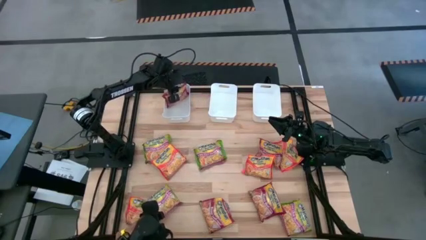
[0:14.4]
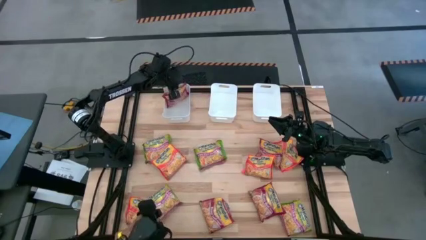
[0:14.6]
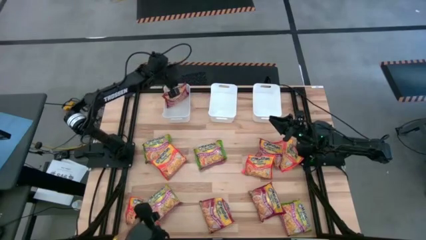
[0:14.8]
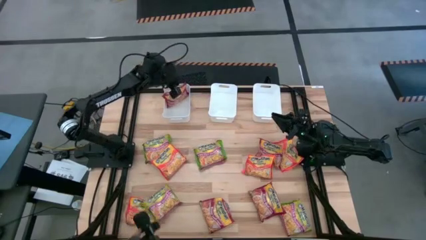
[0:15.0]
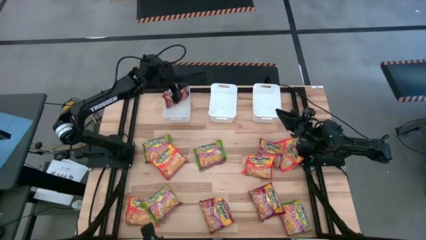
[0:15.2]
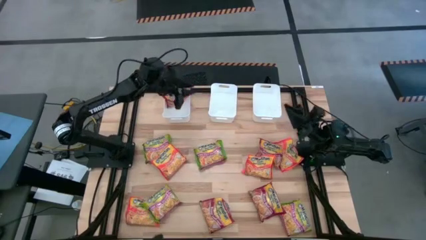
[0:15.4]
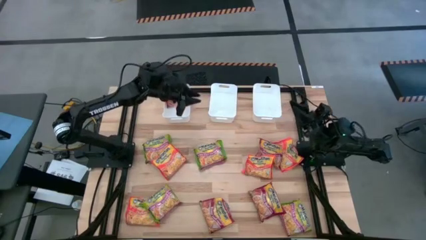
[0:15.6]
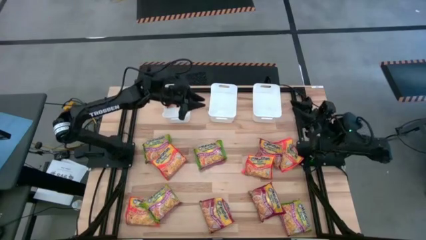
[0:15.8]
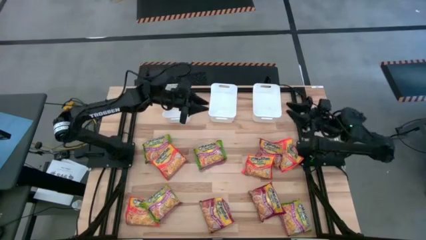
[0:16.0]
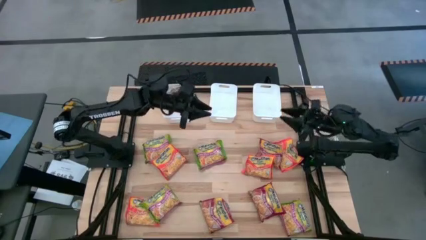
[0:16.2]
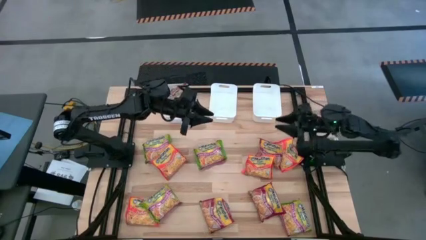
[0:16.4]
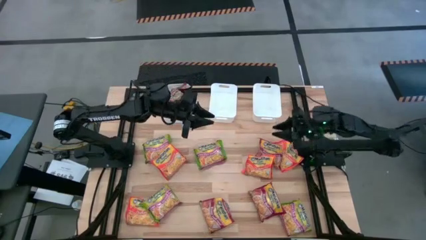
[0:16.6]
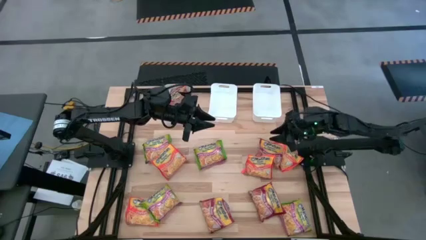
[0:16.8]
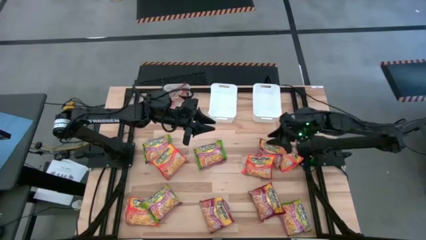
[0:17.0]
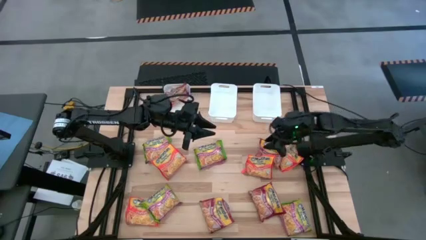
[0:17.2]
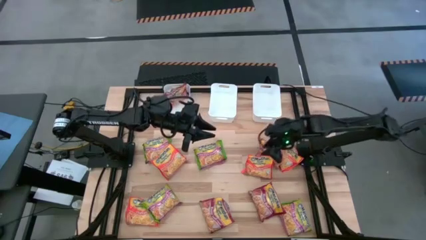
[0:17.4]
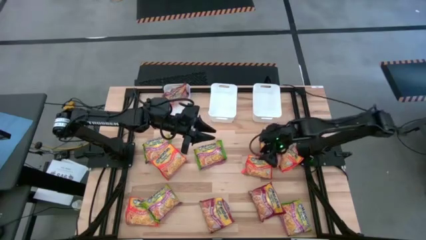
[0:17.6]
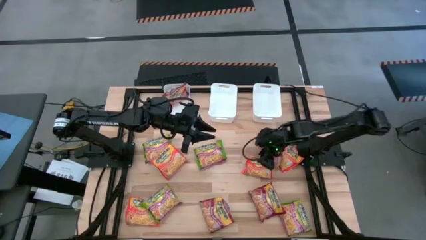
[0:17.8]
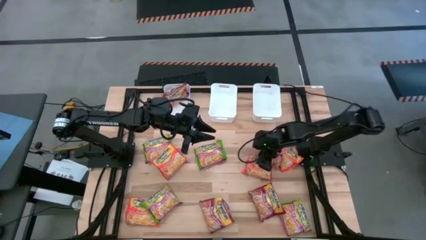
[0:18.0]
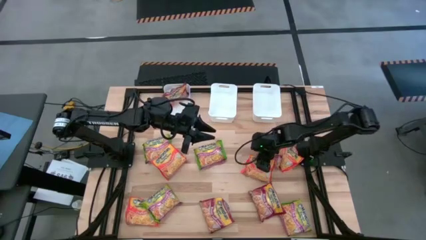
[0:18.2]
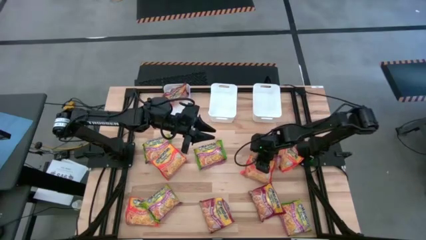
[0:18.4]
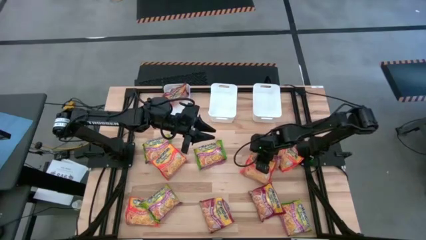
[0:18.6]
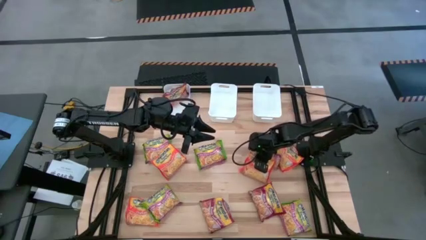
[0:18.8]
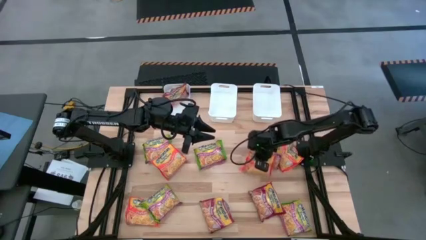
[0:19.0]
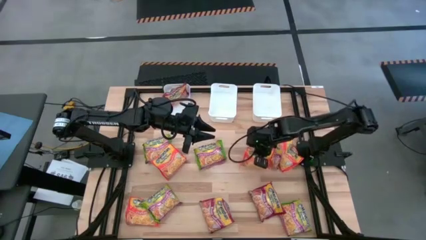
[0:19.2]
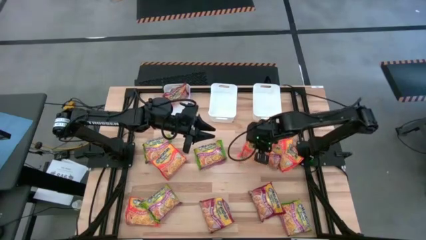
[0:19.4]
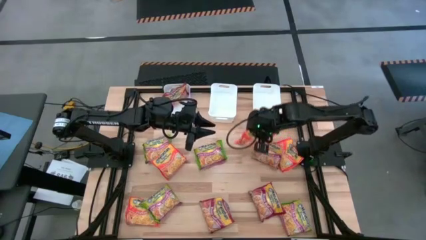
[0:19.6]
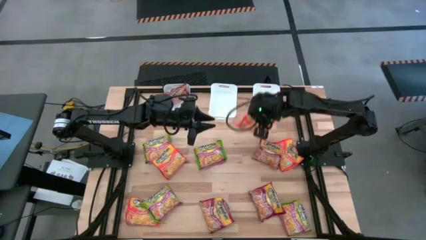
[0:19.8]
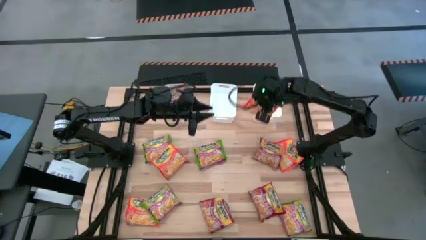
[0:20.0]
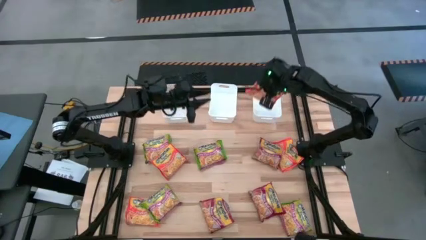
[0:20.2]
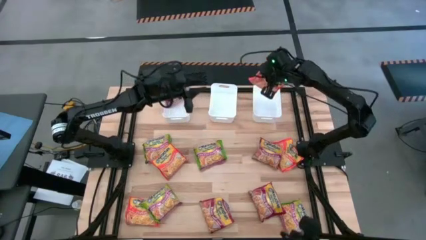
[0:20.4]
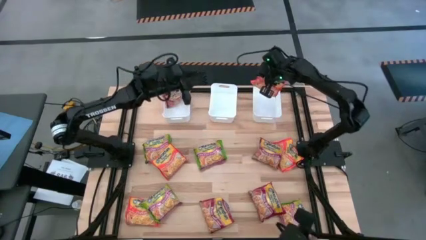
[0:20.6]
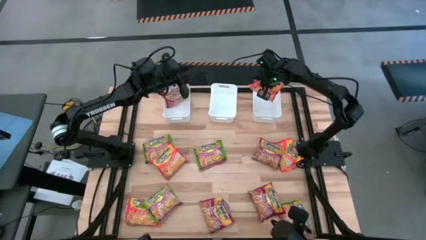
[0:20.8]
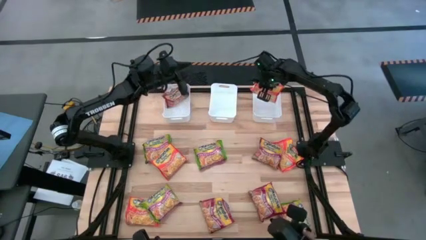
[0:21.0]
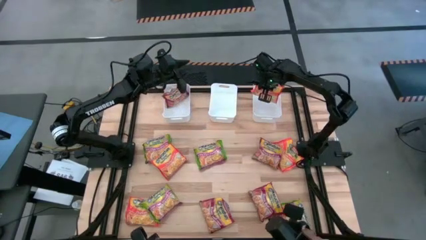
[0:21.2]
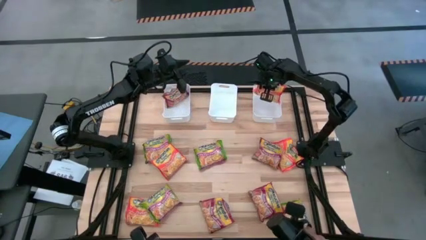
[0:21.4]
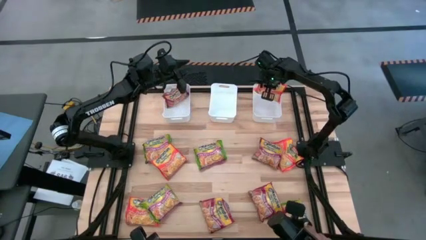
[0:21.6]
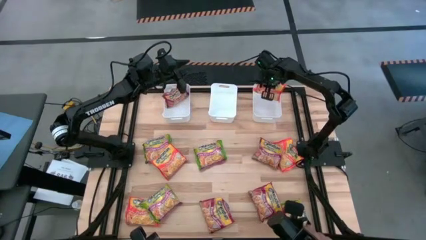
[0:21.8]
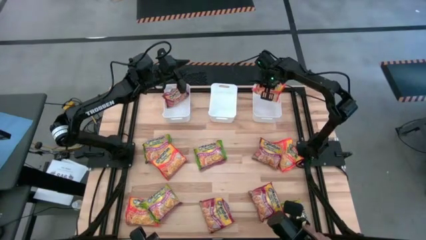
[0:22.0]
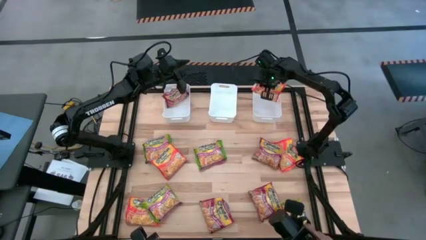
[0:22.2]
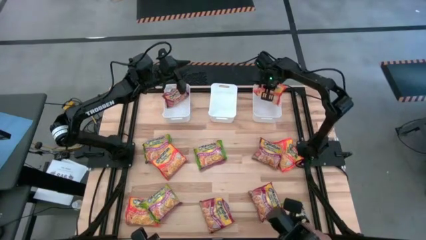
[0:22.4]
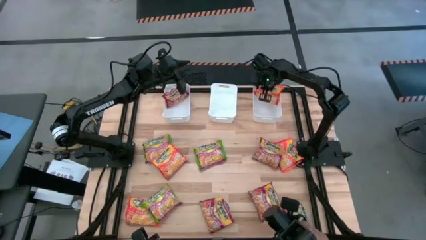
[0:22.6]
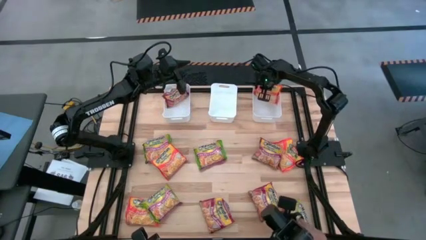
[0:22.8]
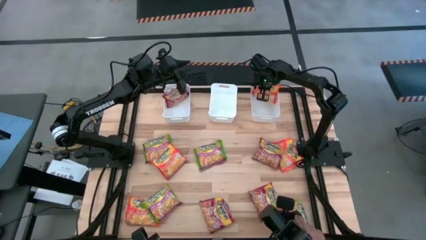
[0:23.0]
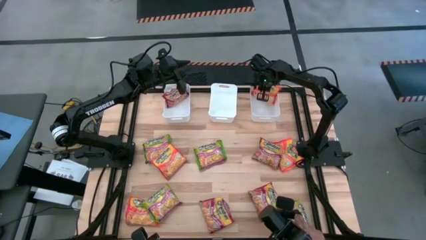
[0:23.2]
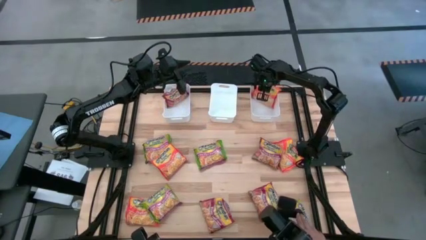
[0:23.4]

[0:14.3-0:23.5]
Task: Sort Maruchan noodles
Put the orange noodle pack into the right white bin

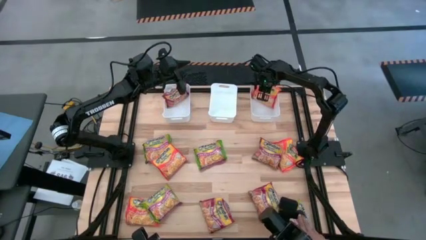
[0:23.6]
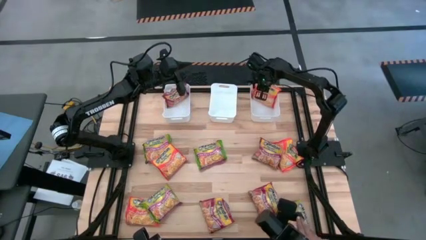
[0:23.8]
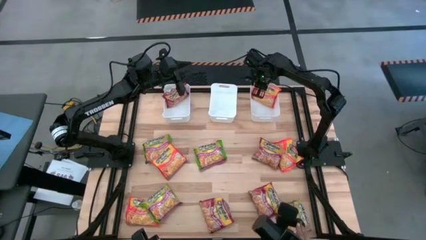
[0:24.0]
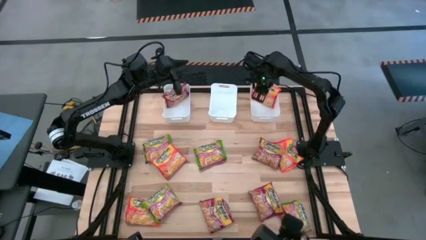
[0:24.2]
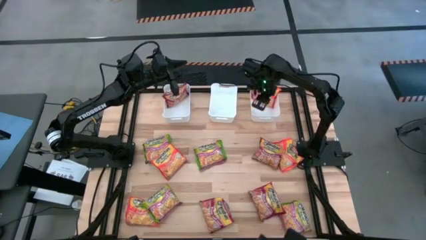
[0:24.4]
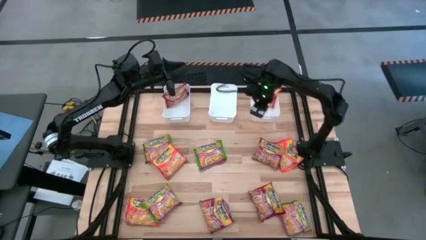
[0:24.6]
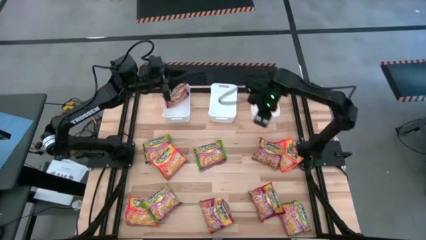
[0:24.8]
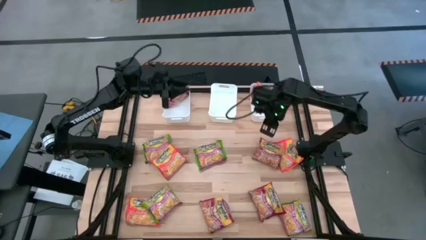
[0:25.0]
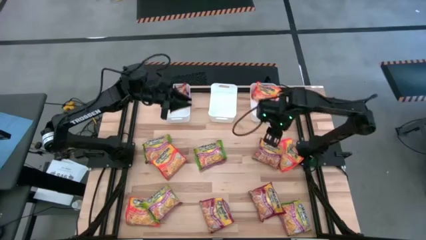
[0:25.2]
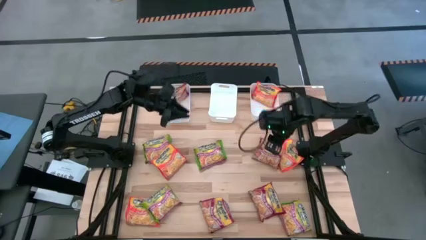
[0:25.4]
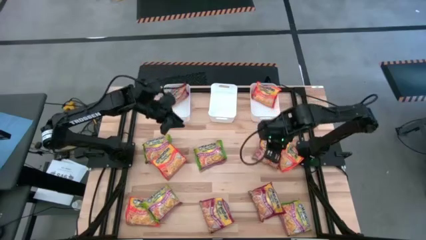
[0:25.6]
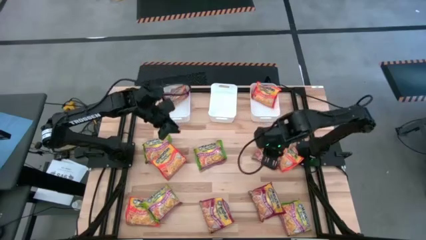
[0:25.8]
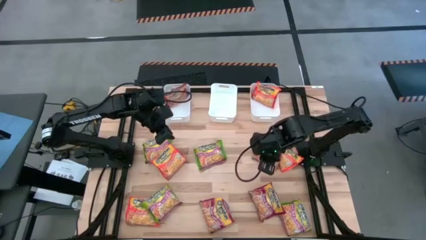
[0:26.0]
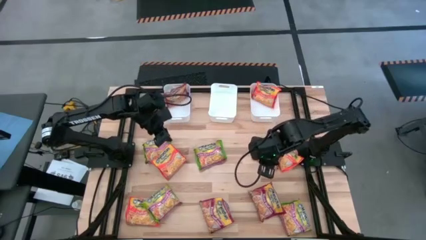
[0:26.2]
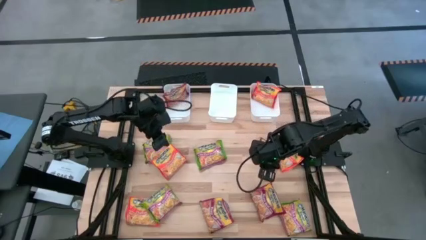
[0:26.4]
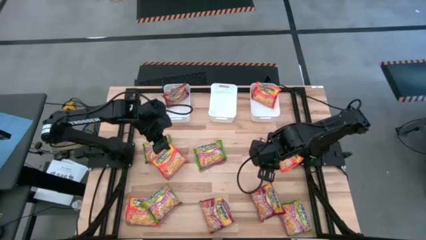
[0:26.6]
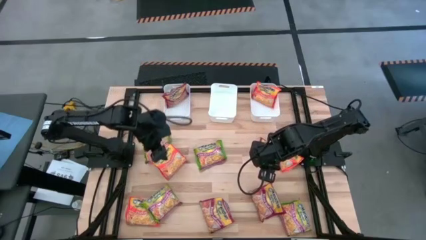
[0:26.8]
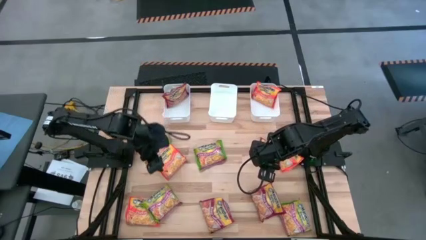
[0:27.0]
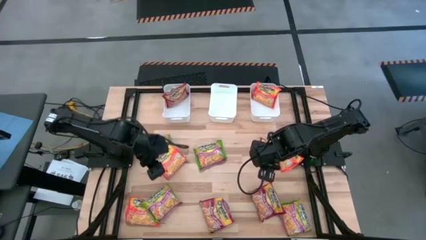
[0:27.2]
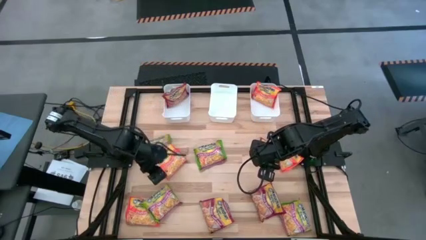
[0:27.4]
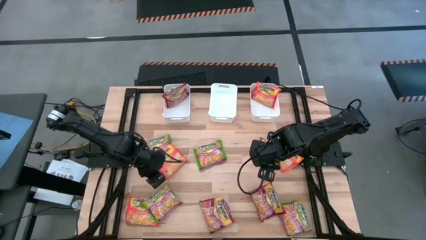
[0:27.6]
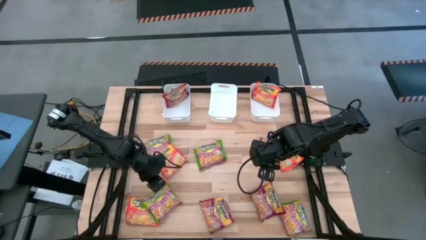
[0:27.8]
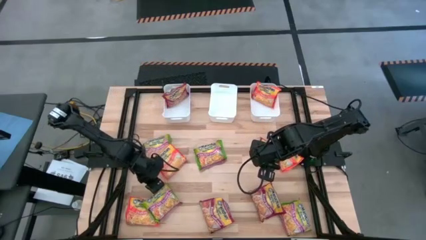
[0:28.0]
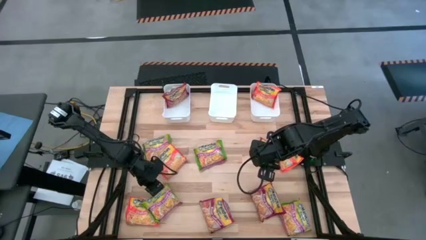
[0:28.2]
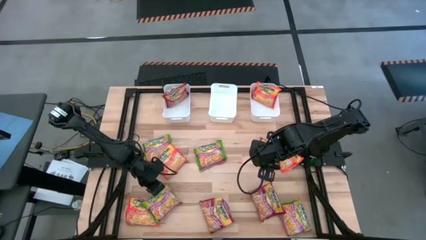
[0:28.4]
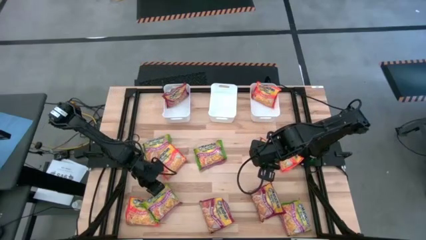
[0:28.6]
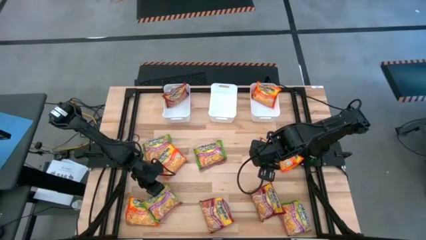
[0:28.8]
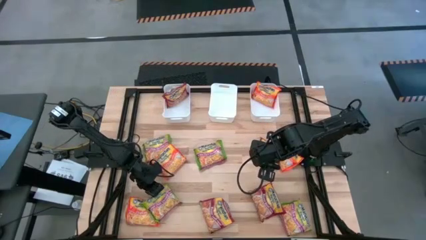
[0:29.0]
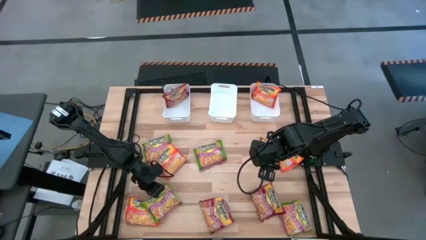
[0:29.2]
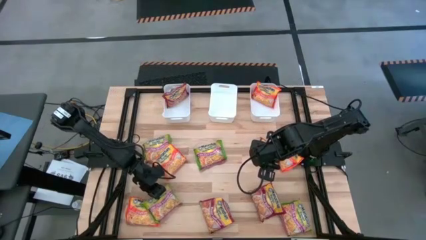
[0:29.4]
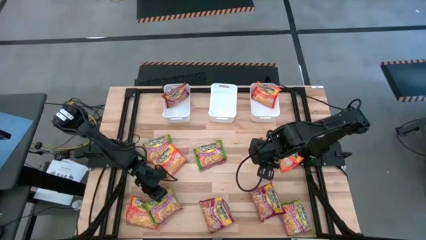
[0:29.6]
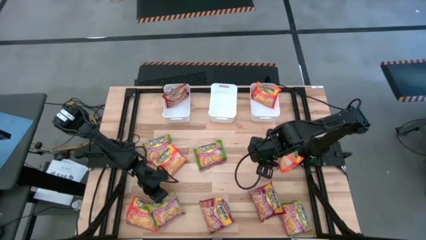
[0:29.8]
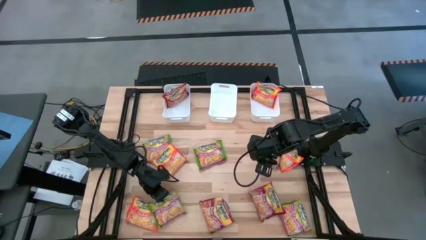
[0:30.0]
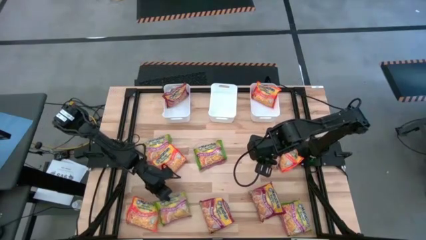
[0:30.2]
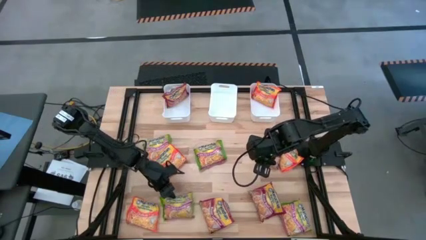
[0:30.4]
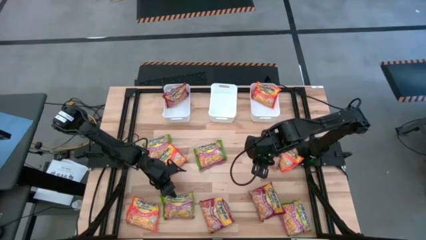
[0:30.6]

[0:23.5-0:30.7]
Put the green noodle pack into the middle white bin
